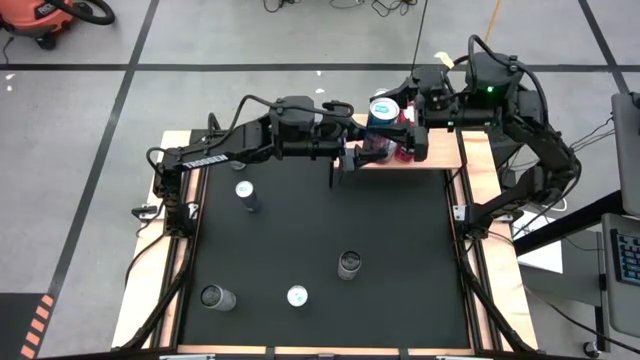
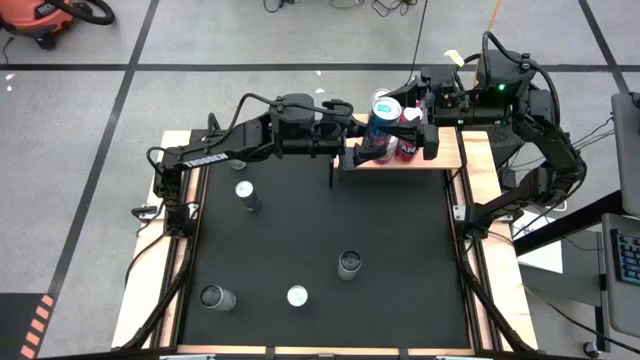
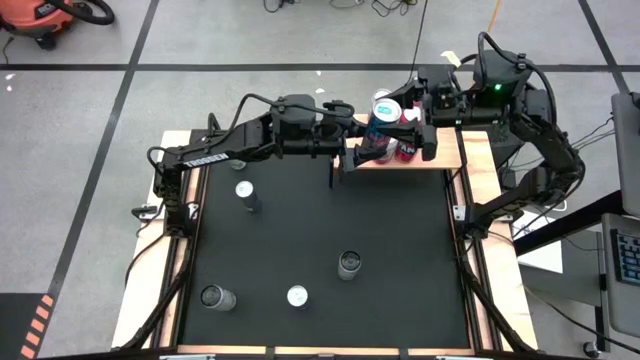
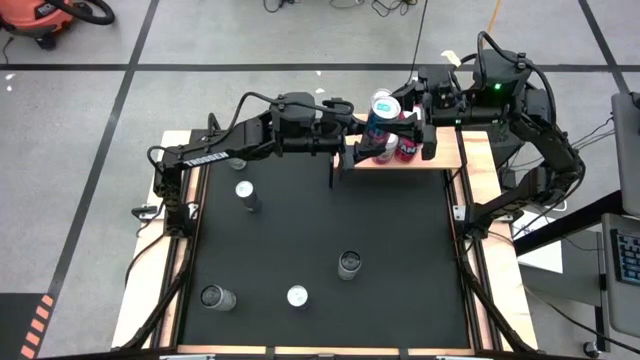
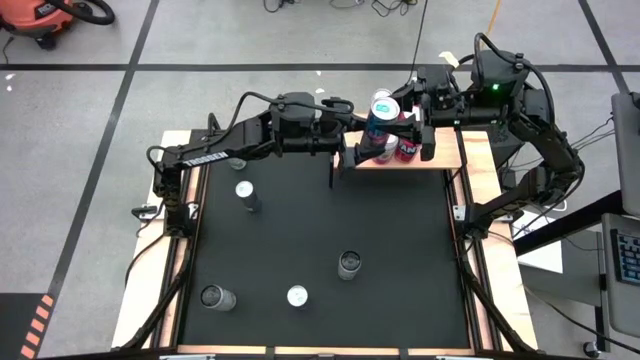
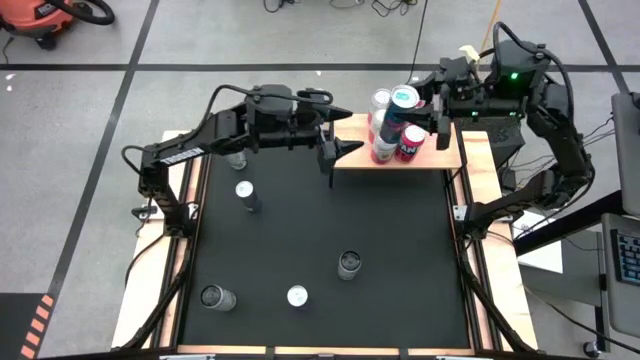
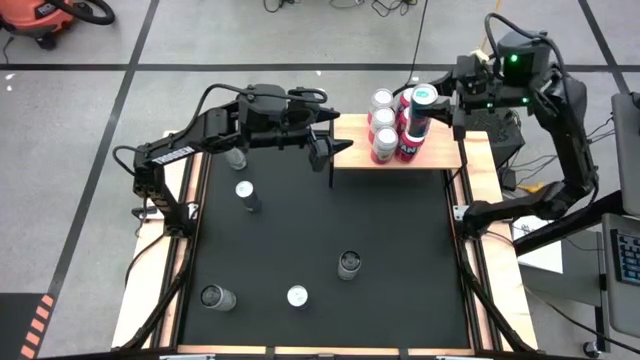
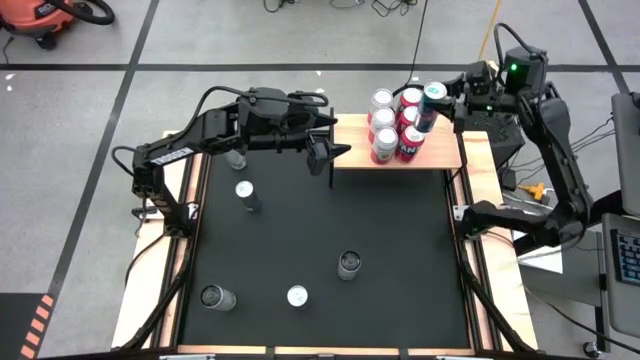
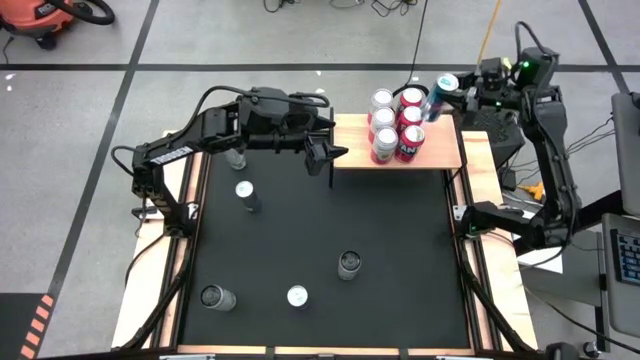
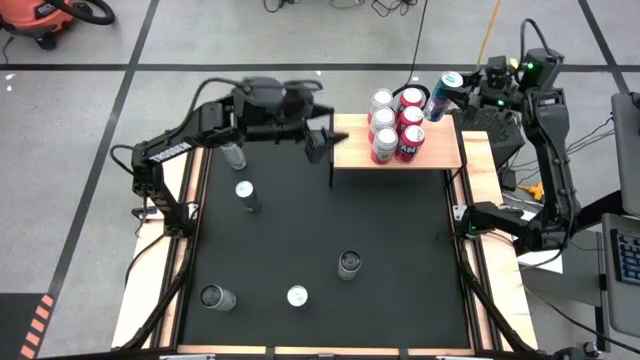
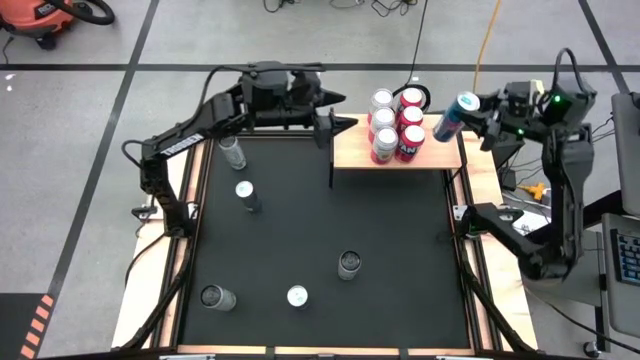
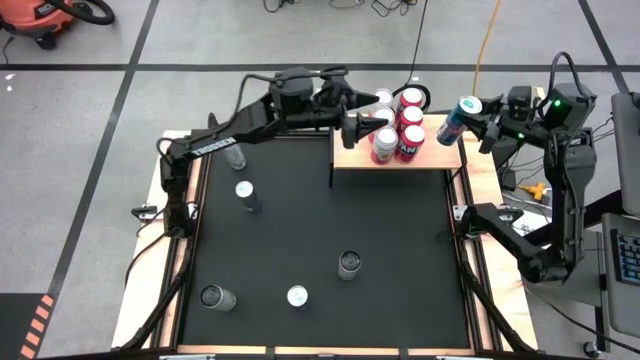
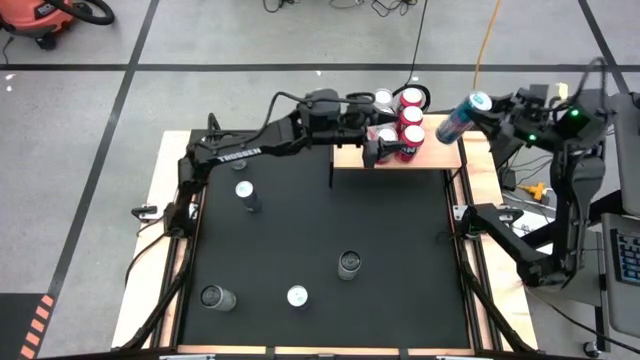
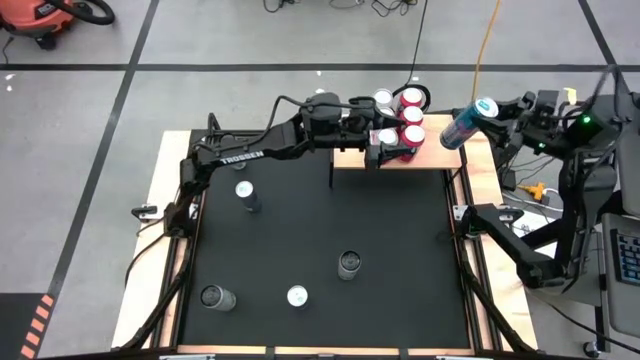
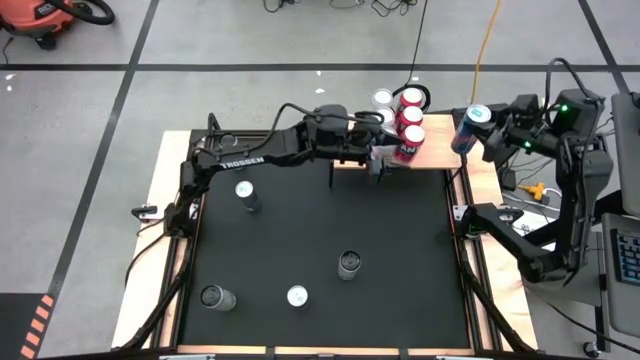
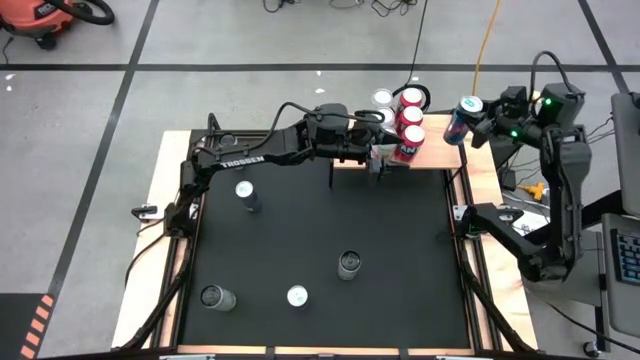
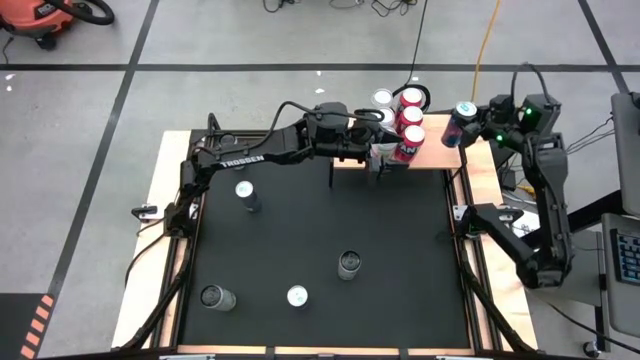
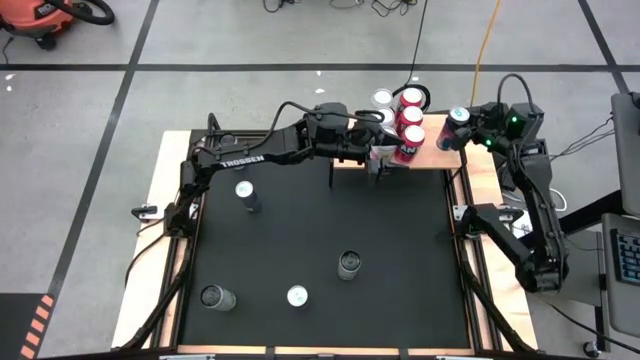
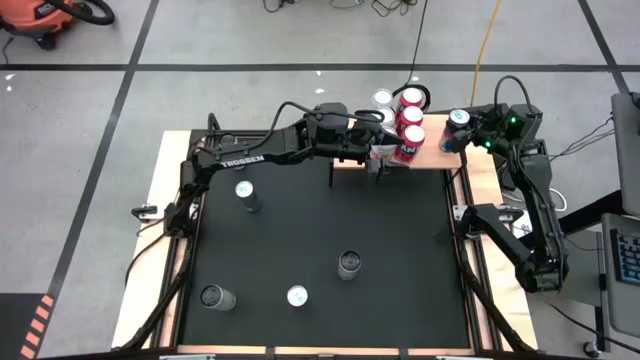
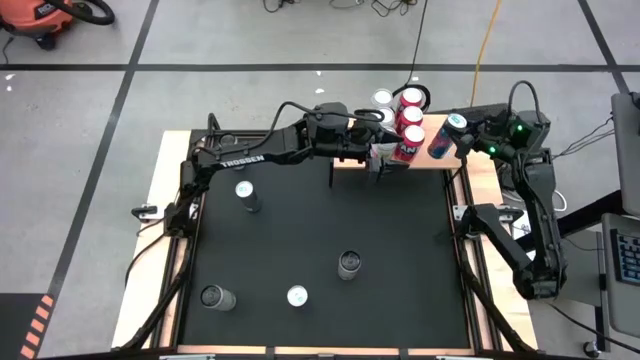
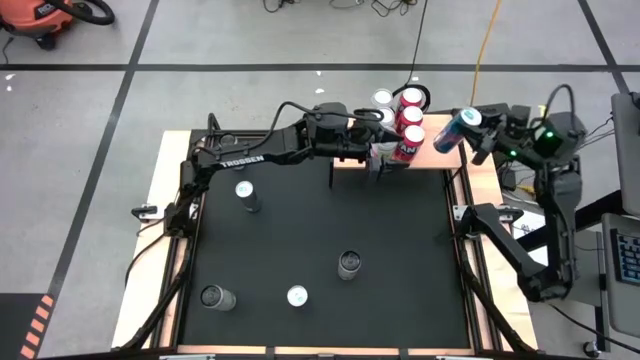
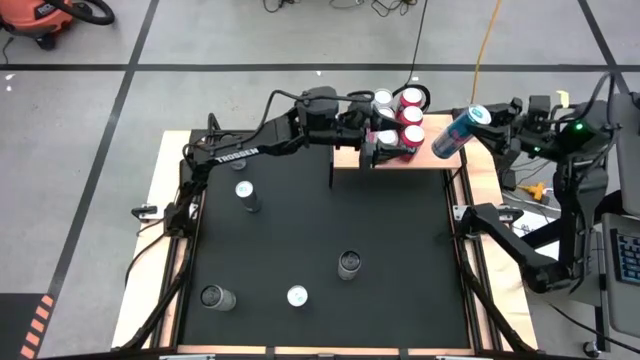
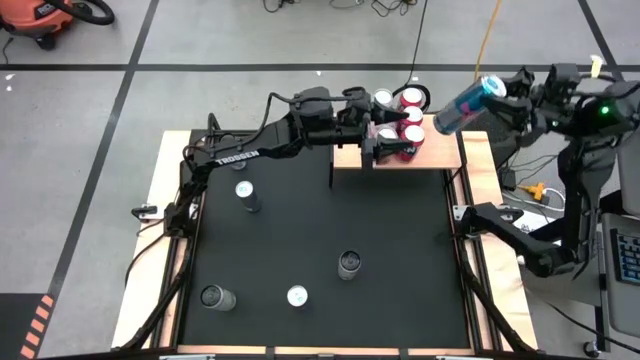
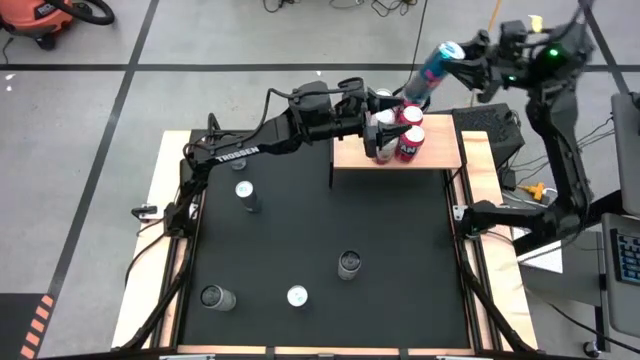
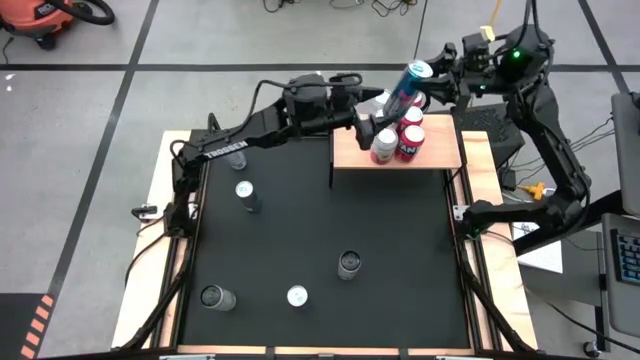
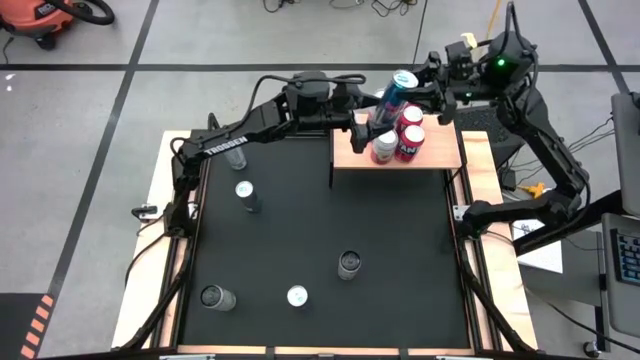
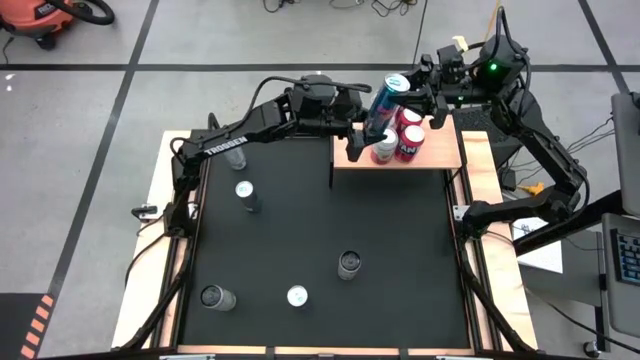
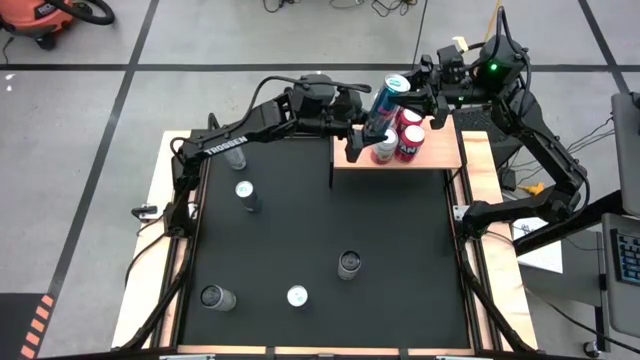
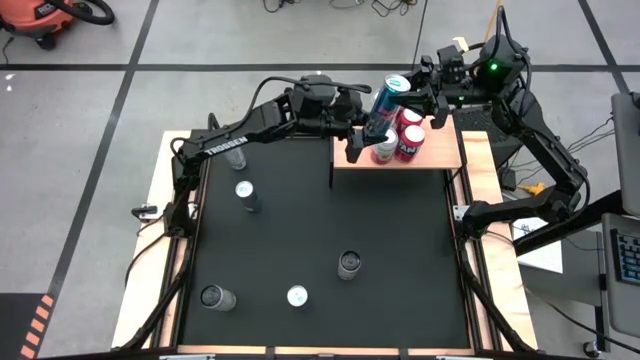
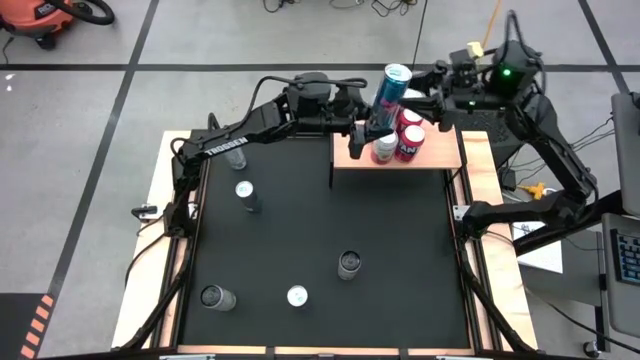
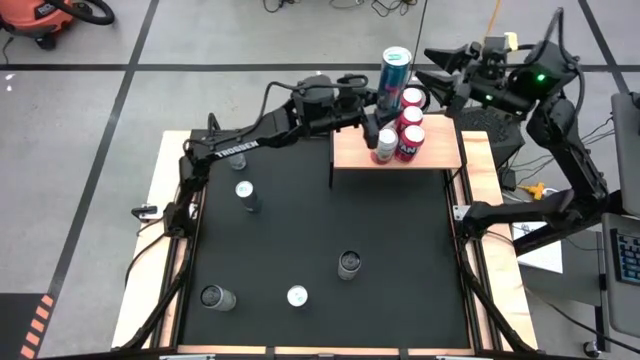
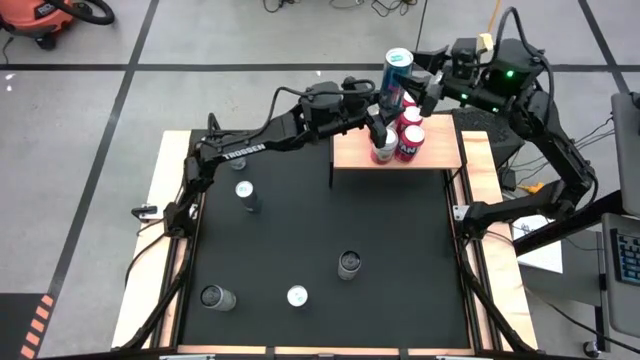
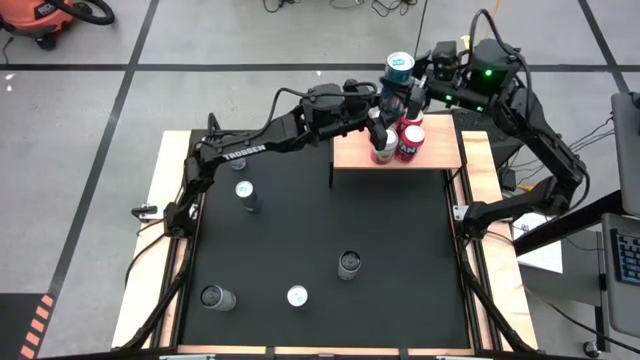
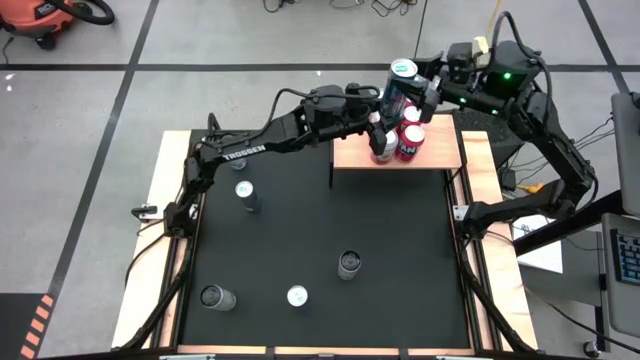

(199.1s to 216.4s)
Task: Place canned beverage on shelf
Put the middle blue soda can on the shelf

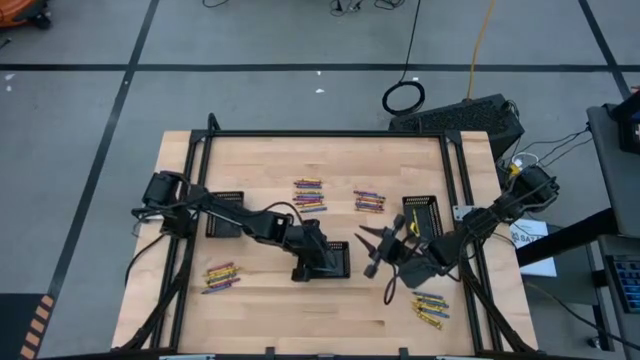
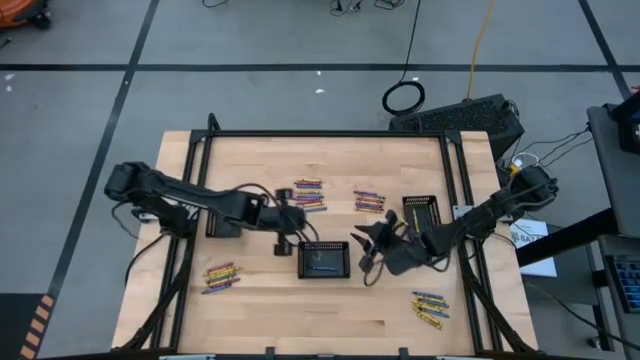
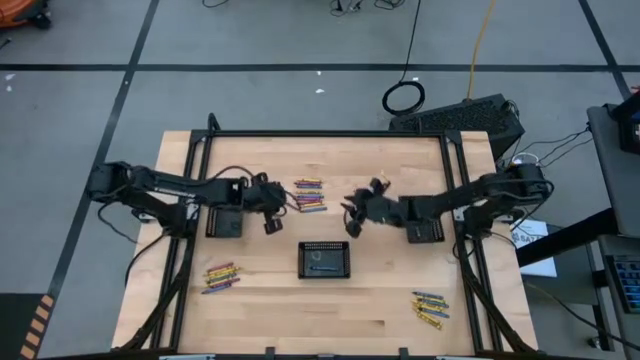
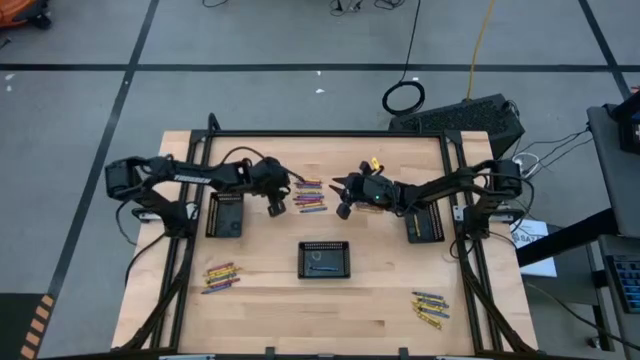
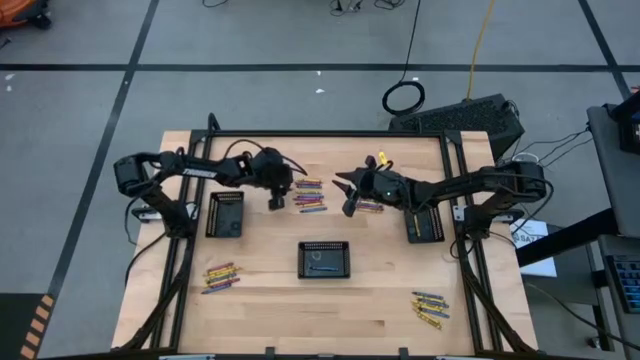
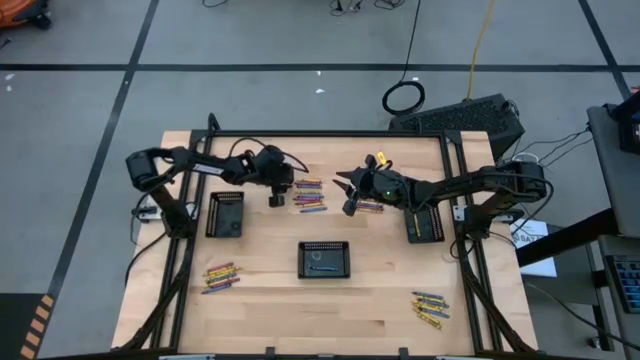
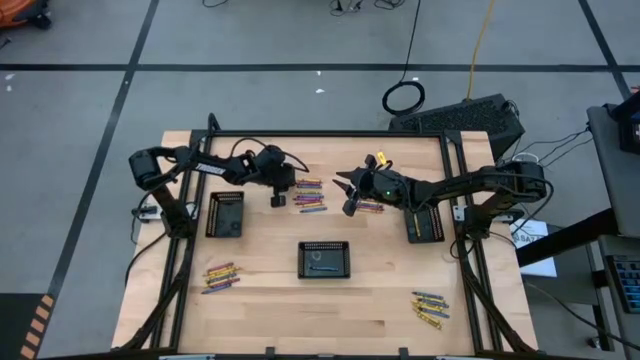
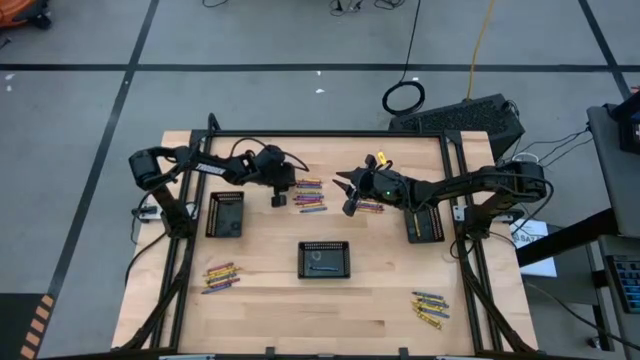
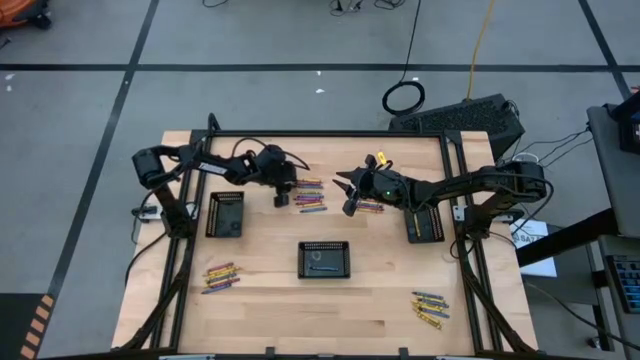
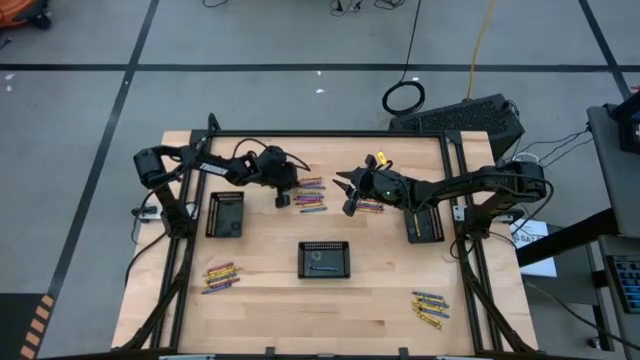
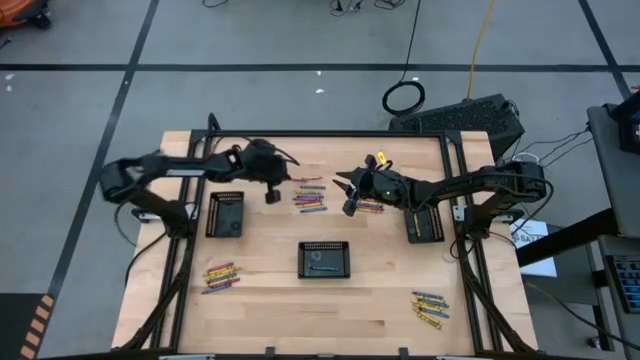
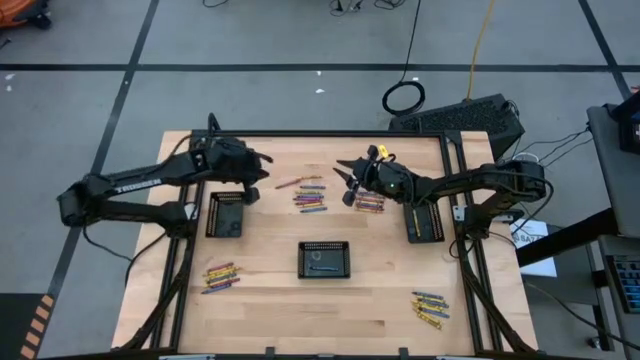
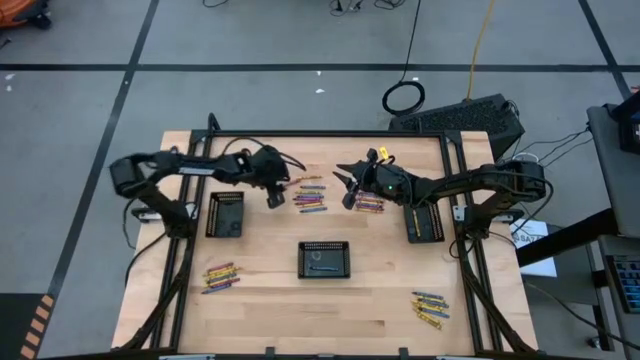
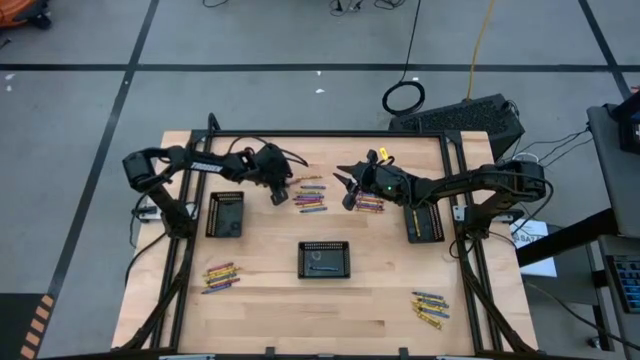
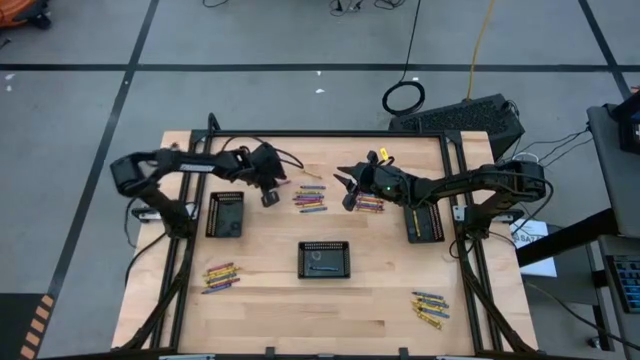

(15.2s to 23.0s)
Task: Sort crayons
Put the red crayon into the left black basket
